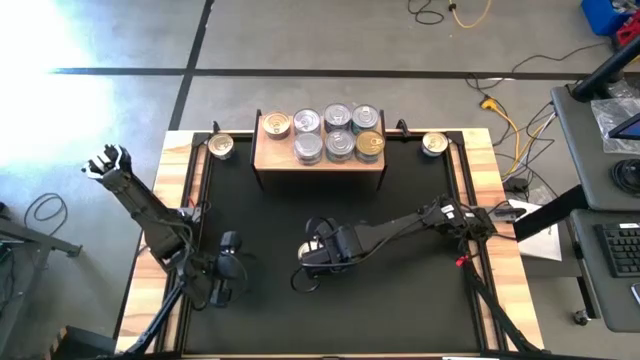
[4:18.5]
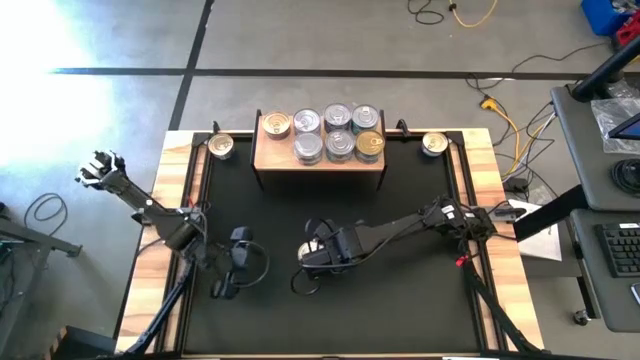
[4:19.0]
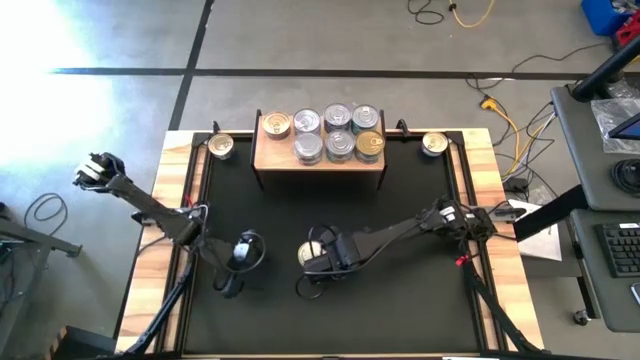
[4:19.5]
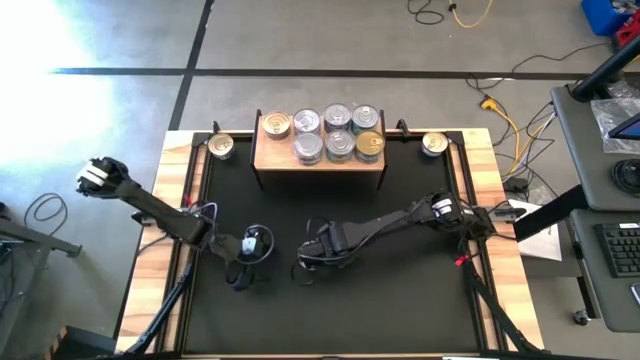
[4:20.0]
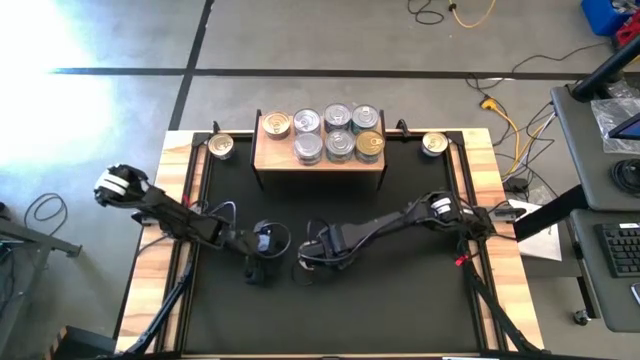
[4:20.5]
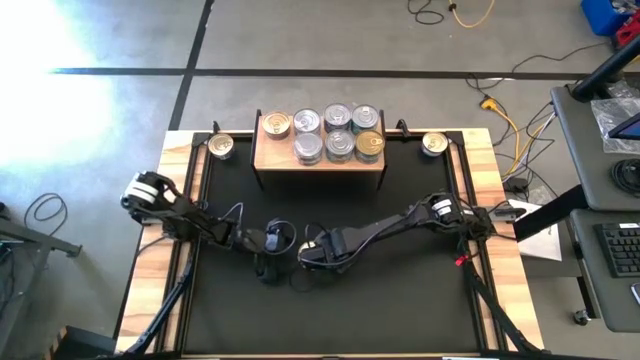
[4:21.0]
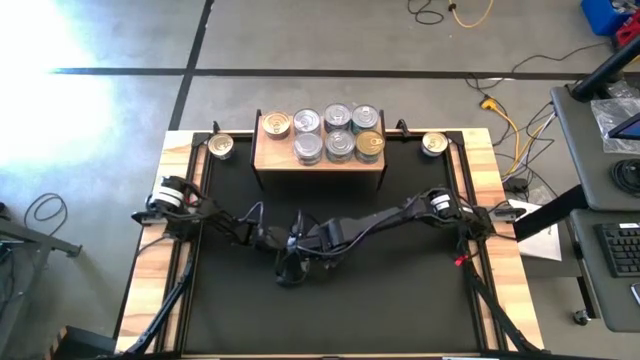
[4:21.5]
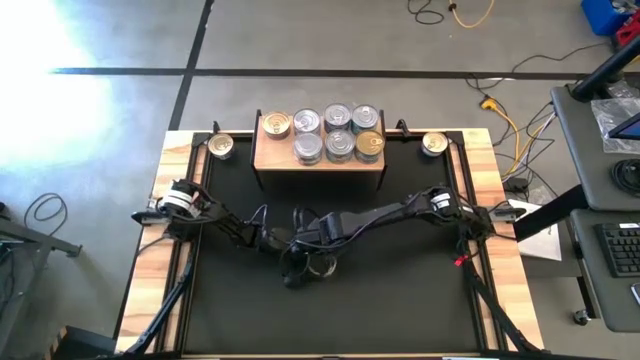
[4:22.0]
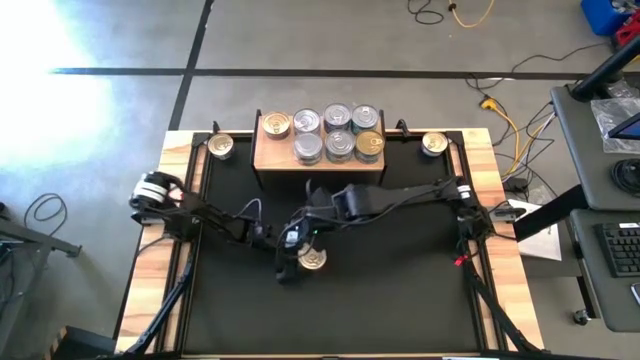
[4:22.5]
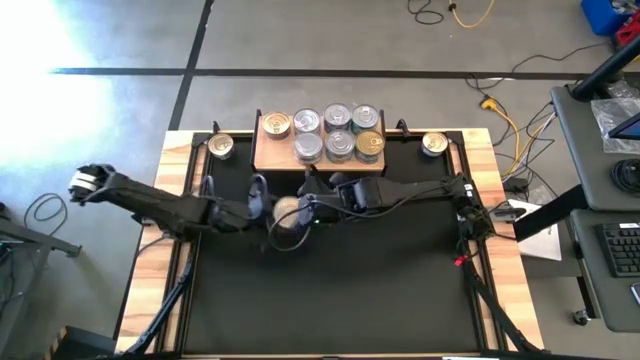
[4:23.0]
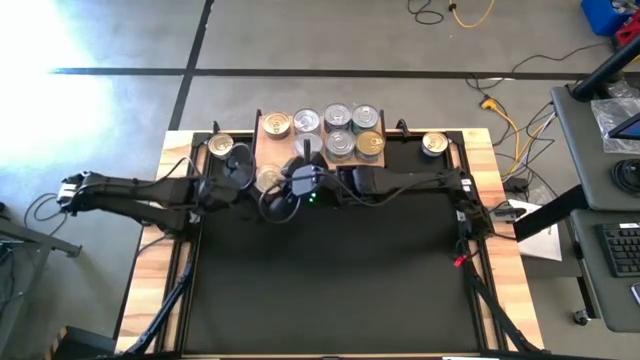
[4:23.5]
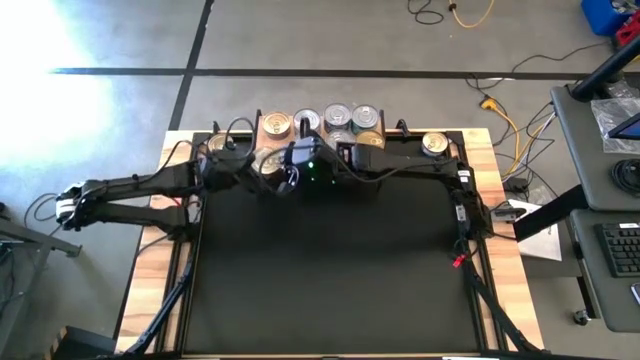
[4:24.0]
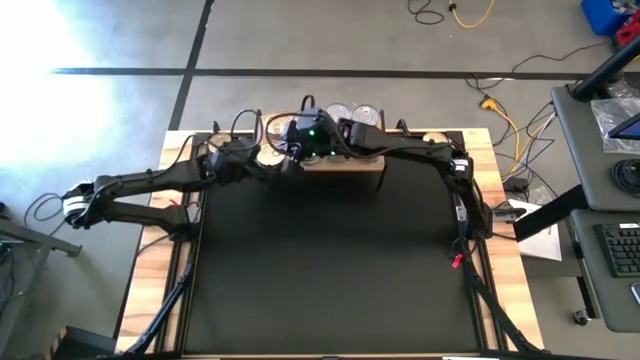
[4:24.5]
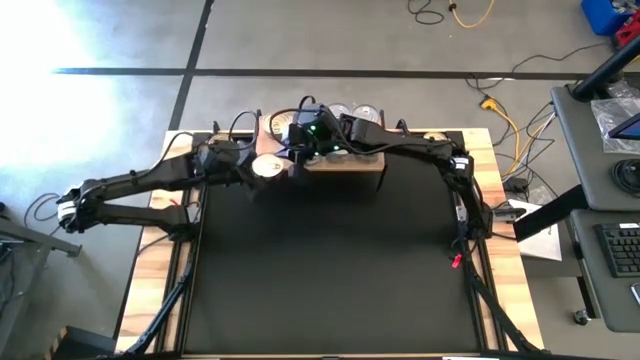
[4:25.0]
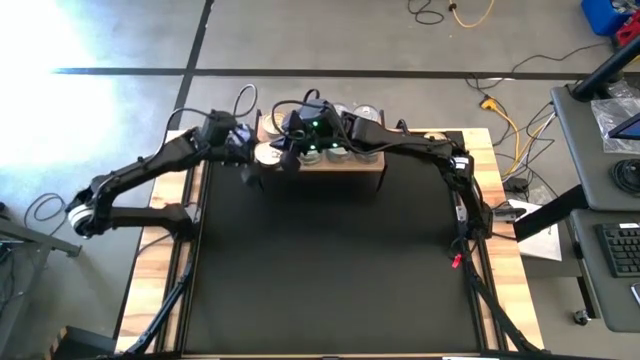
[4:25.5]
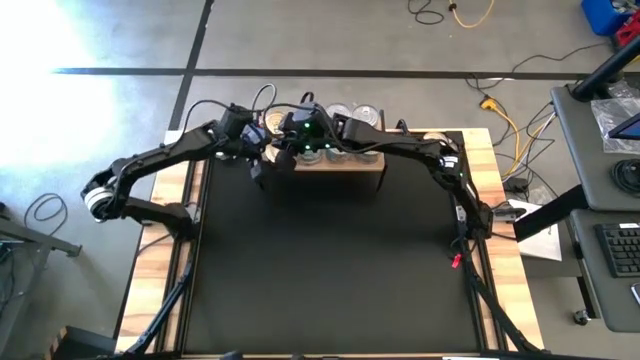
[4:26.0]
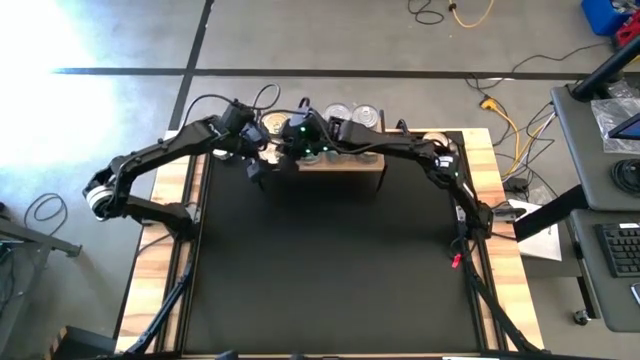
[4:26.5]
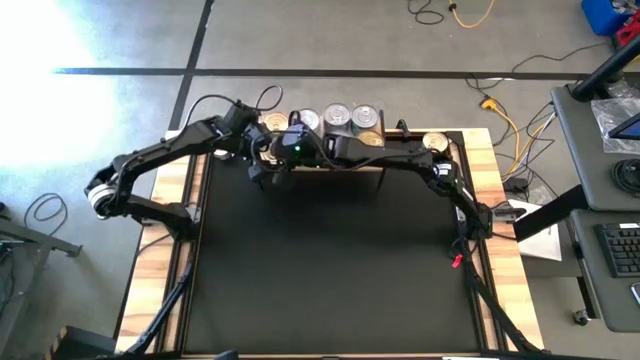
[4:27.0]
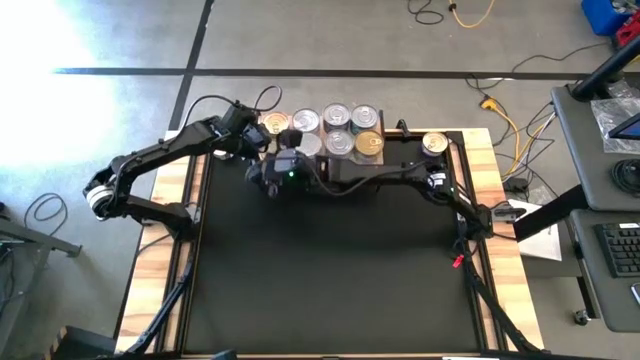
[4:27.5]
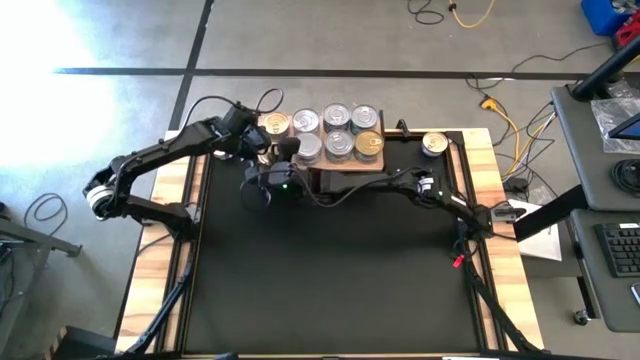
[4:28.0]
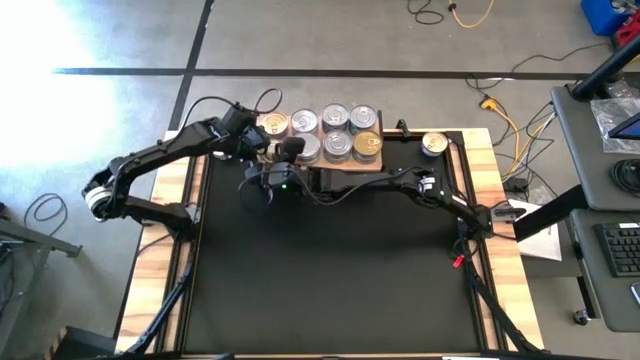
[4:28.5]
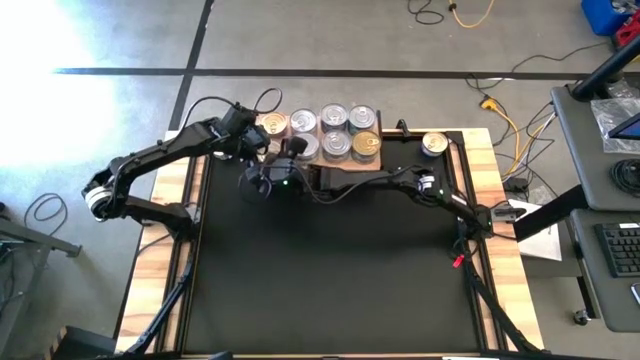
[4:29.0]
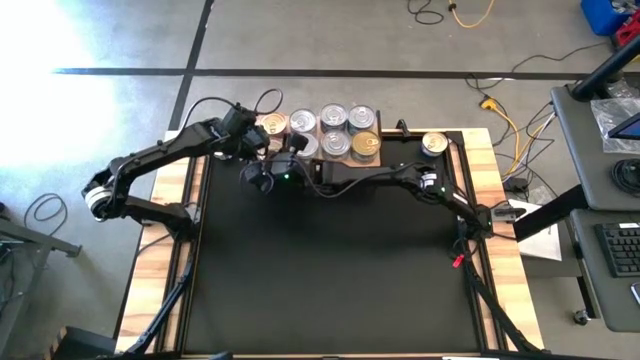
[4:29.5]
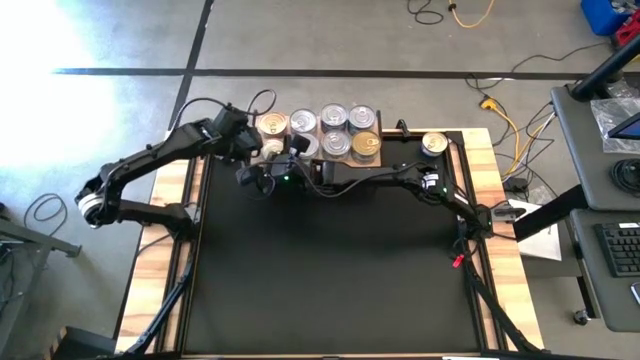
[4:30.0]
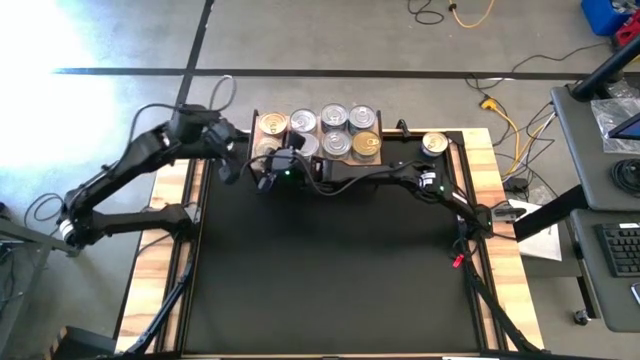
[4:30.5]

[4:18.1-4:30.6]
Task: Stack canned seafood by type on shelf
Put the bottom right blue pink tuna can on the shelf aligned with the other blue pink tuna can

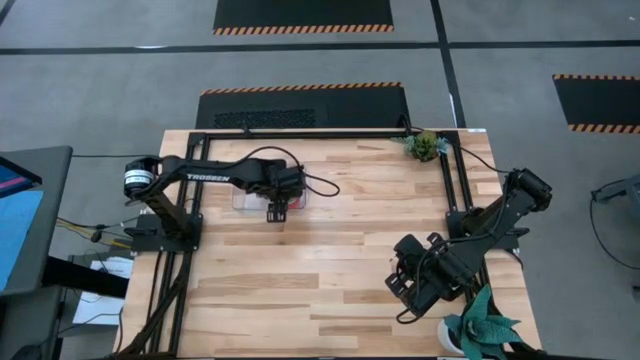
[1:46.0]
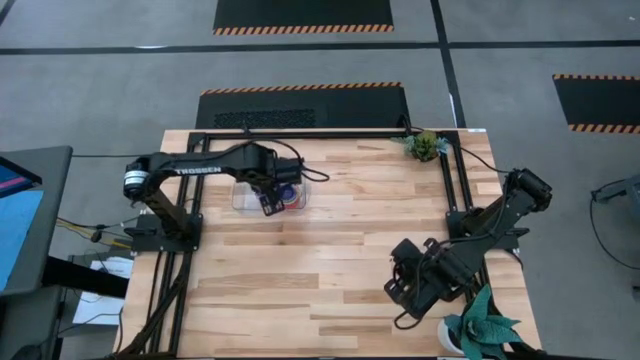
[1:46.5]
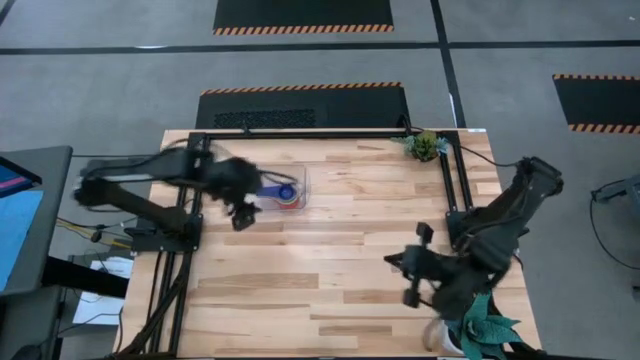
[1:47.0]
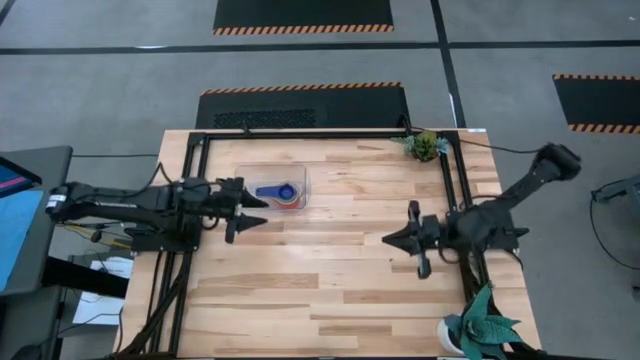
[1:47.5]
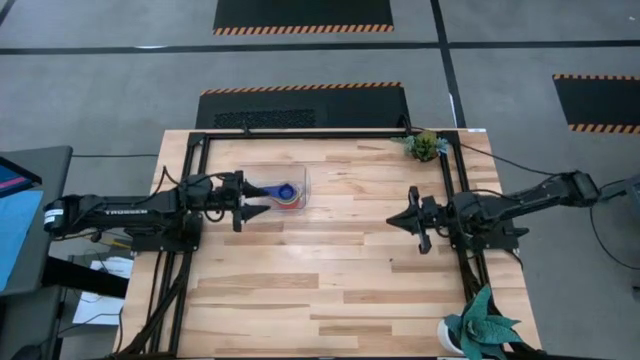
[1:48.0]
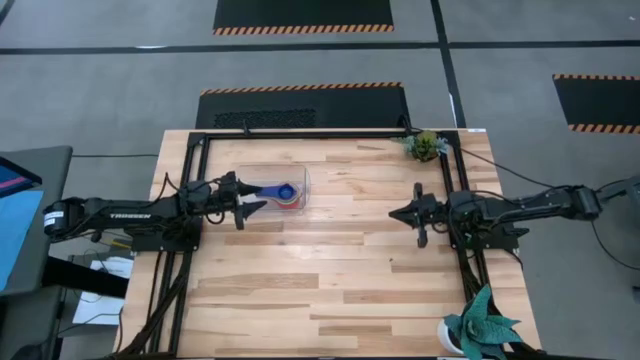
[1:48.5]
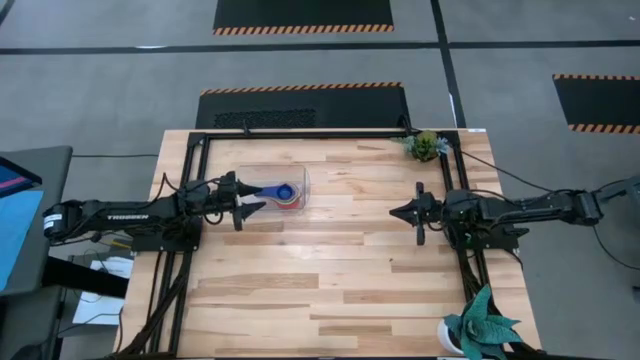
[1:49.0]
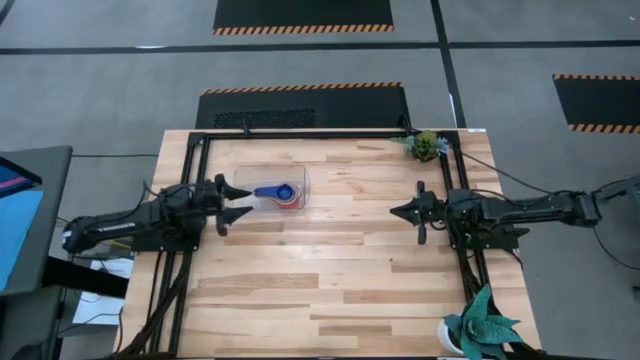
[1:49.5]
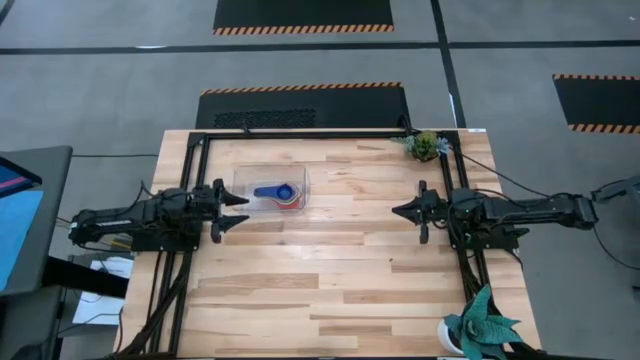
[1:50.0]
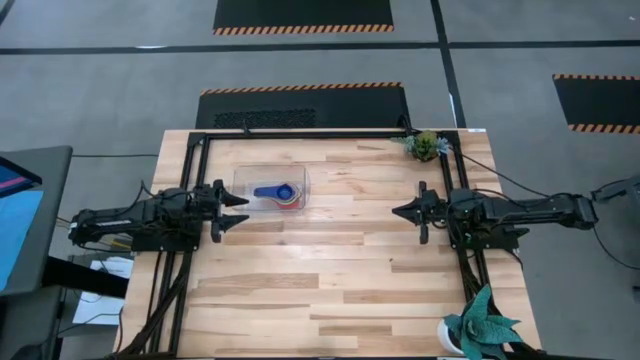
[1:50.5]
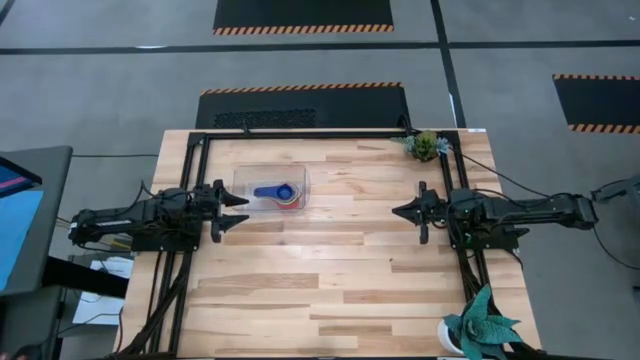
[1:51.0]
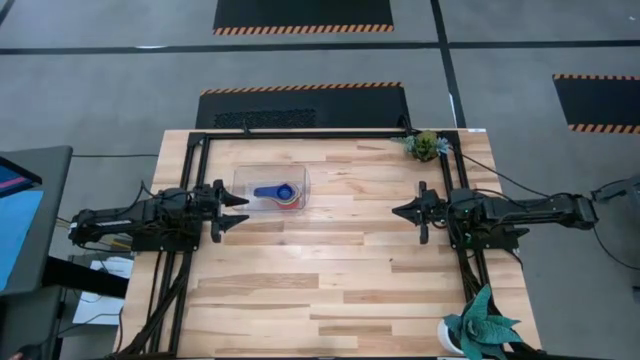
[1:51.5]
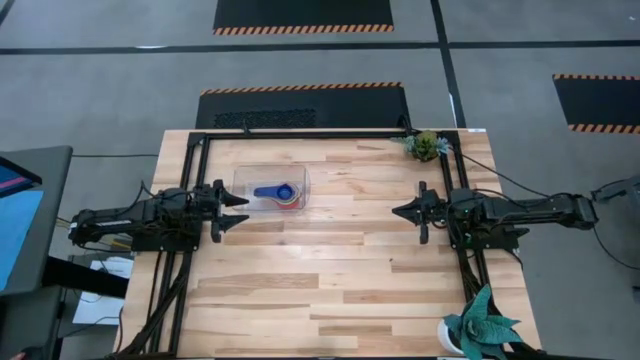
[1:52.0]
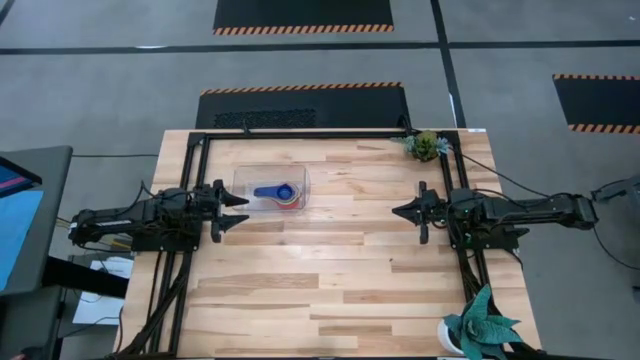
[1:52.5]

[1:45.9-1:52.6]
Task: Nest measuring cups in basket
Return to Home Position

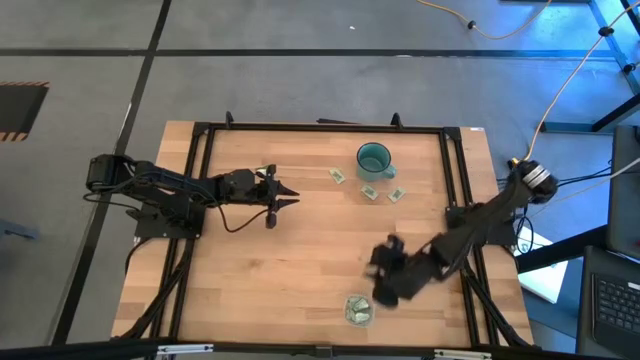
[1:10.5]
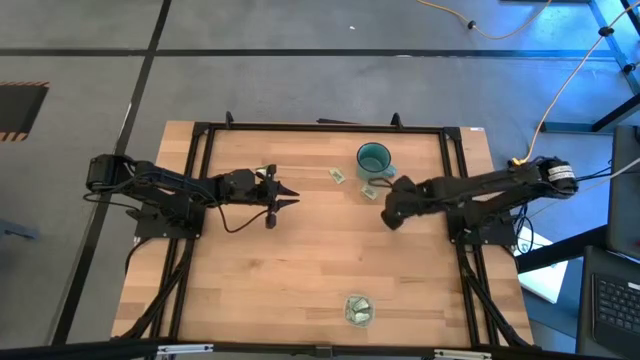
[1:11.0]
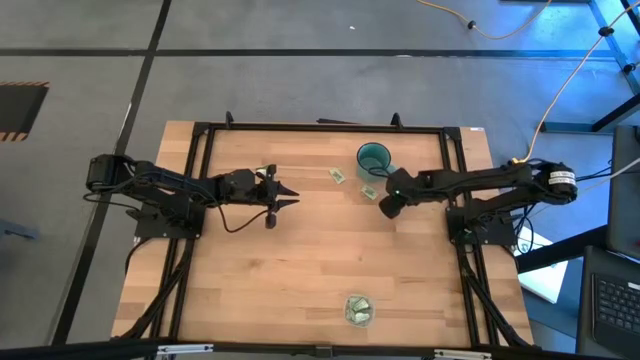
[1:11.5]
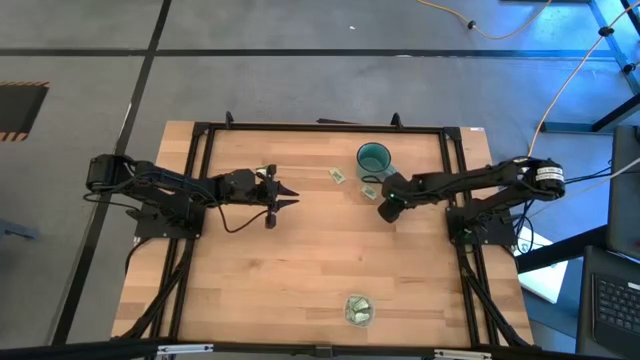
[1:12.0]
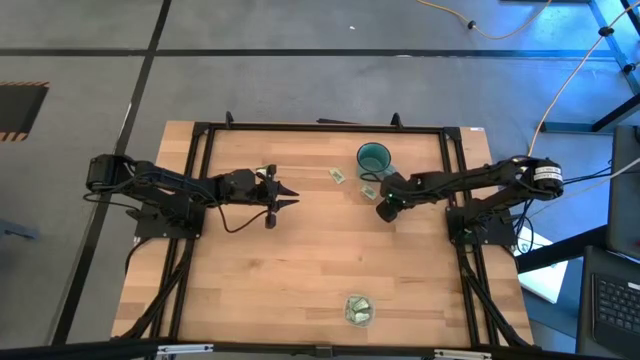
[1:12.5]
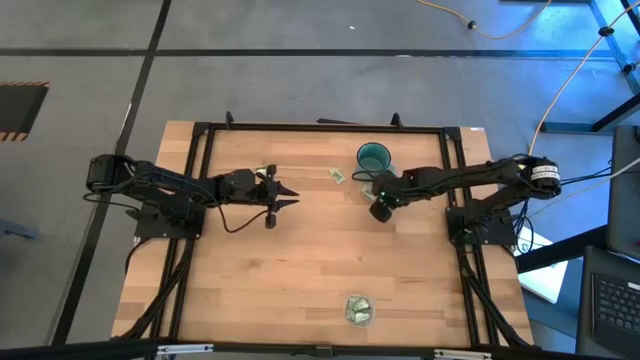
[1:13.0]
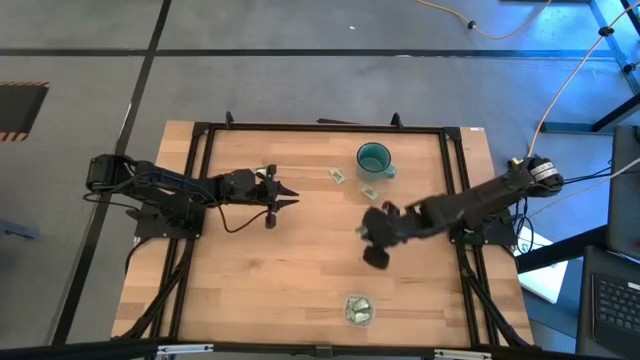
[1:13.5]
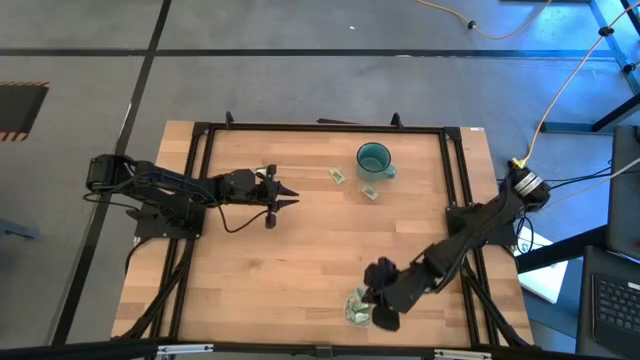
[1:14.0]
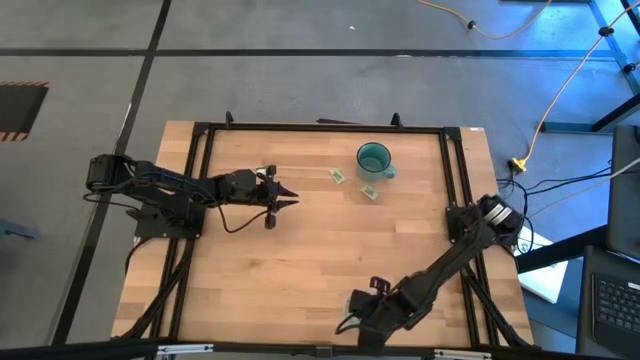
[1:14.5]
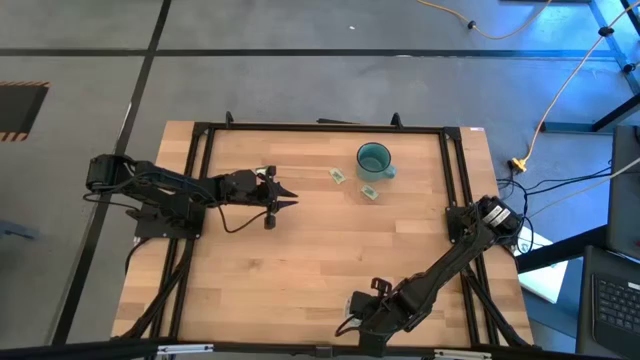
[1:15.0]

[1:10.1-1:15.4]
Task: Pick and place items into bin
Put the light green stevia packet into the transparent bin
